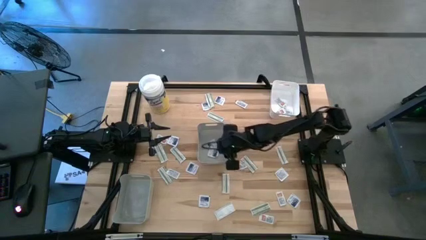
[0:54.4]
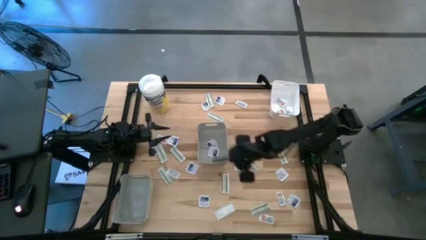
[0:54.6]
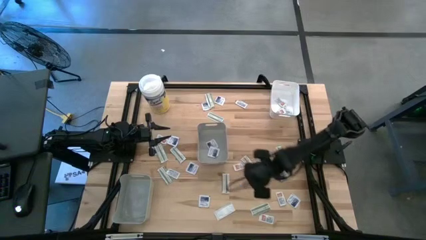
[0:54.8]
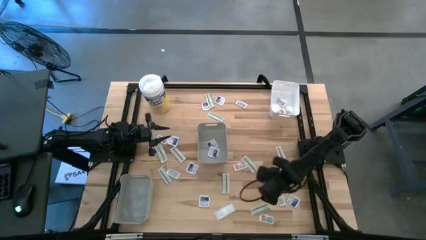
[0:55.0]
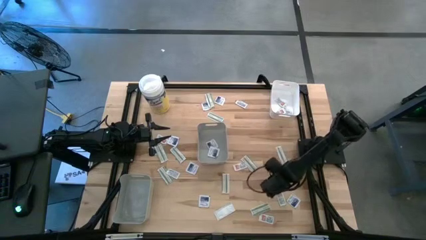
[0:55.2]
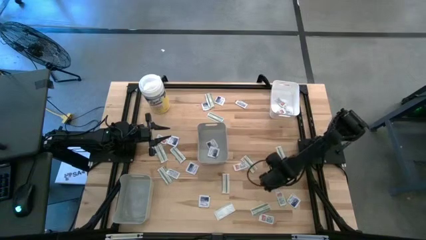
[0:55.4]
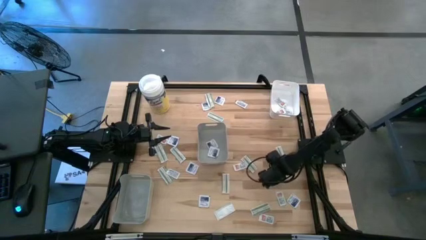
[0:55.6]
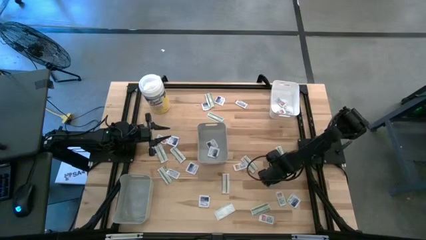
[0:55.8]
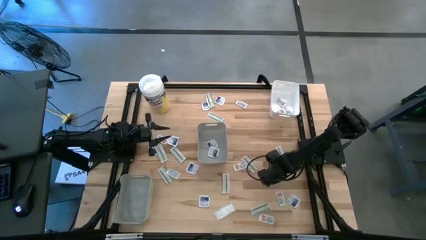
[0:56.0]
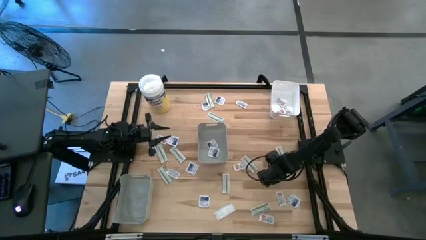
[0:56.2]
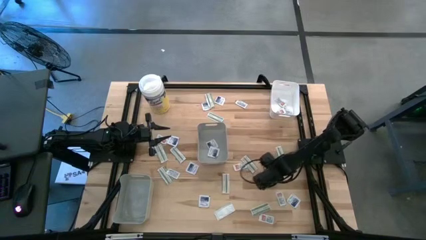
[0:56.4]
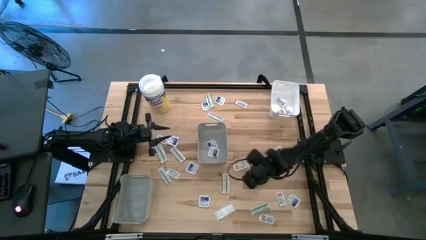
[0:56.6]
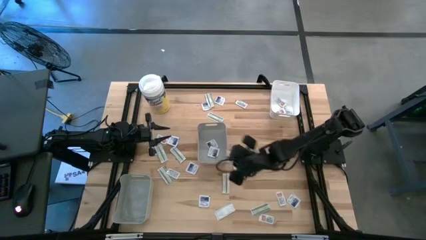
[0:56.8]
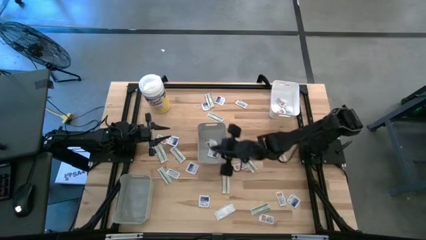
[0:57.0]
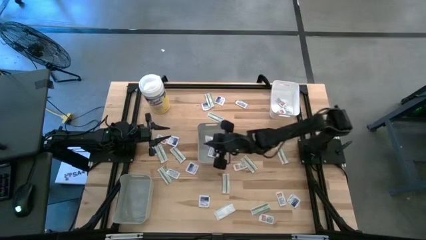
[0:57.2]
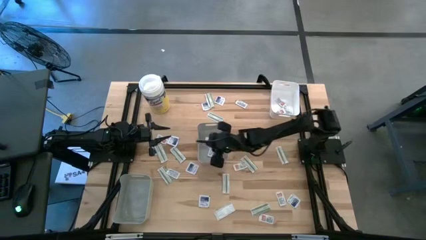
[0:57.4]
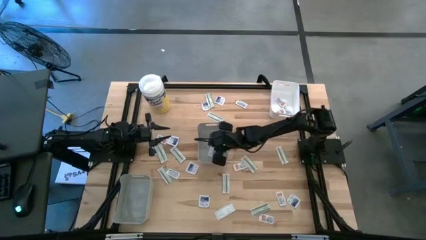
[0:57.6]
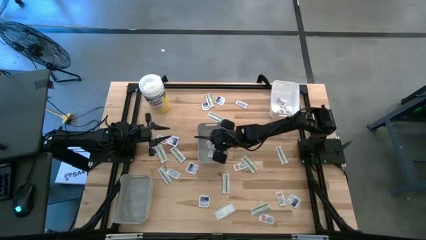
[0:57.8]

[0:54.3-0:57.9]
Task: Pick & Place First Aid Supplies
Put the blue pad into the middle gray bin

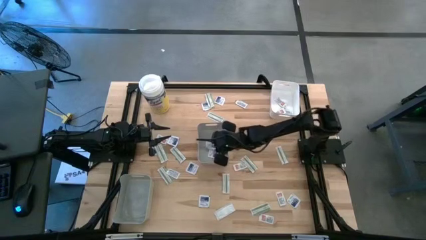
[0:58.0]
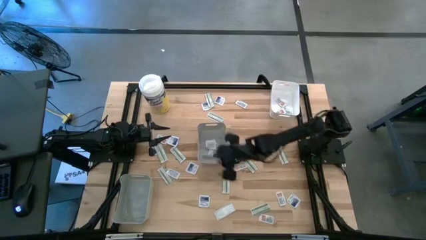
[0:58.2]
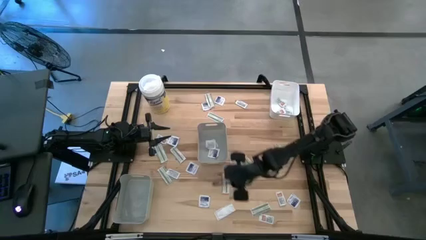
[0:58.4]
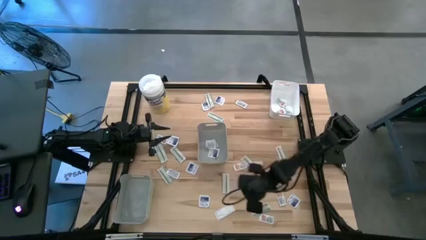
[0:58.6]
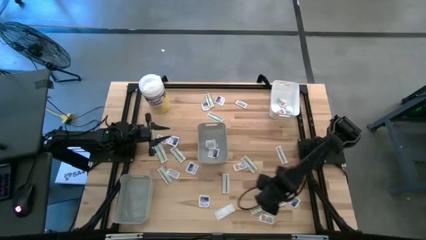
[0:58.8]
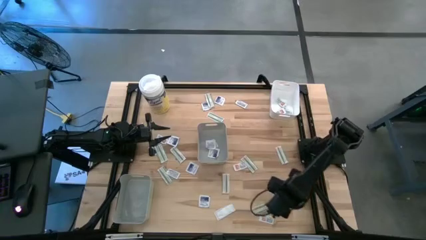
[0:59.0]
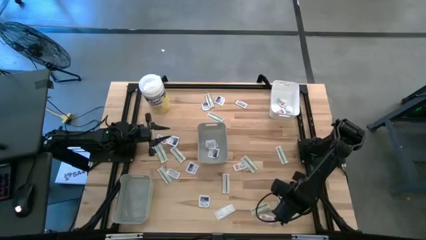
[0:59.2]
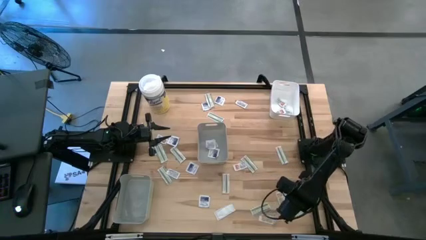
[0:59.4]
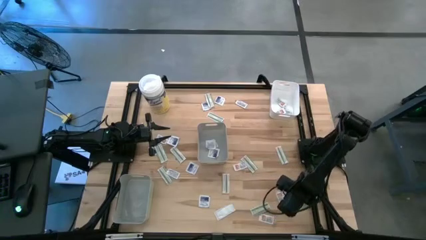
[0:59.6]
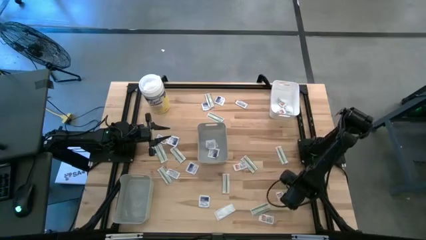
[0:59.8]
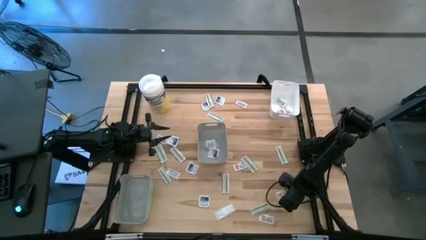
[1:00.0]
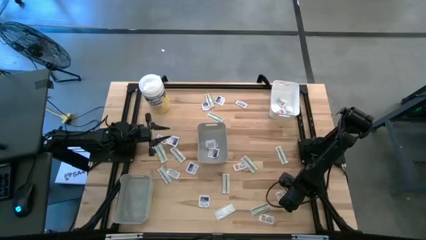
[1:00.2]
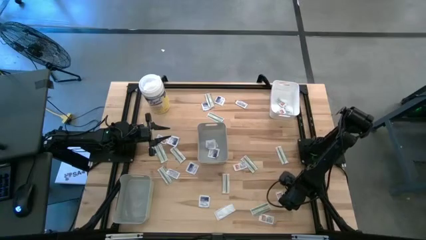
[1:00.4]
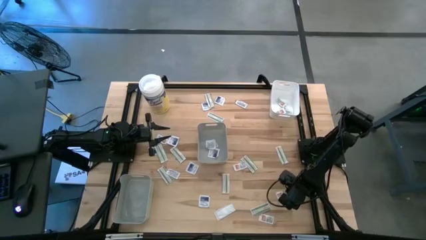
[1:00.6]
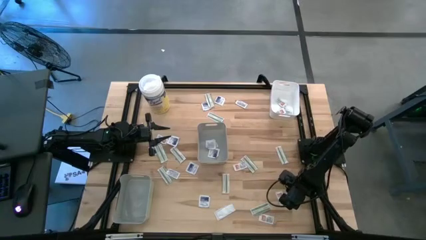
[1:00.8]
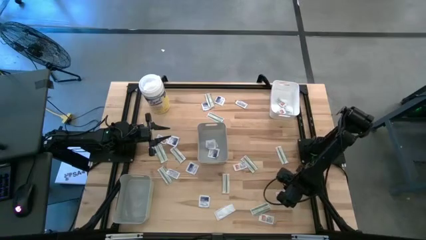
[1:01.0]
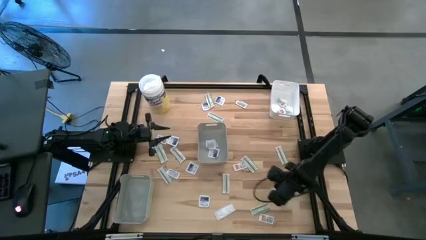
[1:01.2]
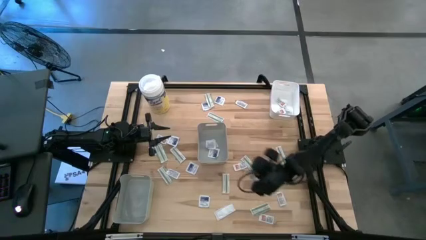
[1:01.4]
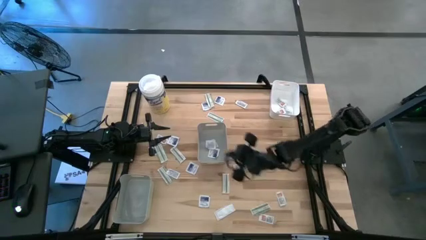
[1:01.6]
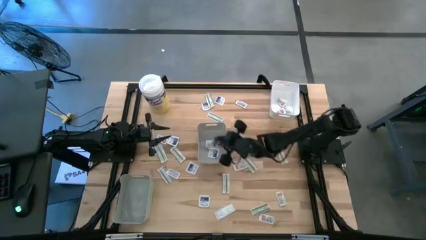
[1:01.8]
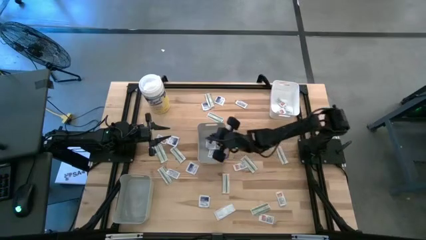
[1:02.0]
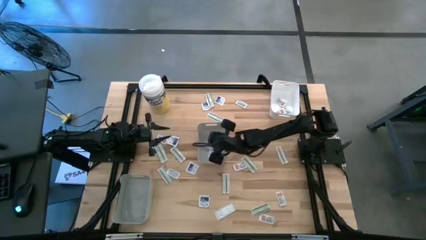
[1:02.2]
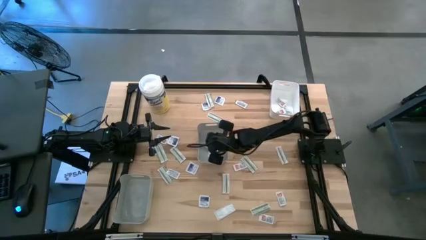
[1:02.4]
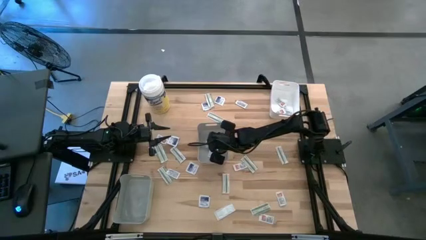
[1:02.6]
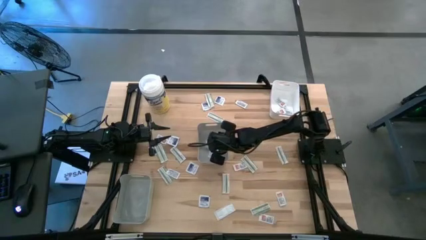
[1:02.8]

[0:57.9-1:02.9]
Put the blue pad into the middle gray bin

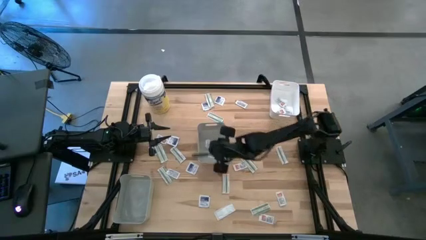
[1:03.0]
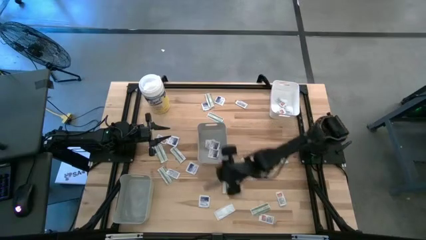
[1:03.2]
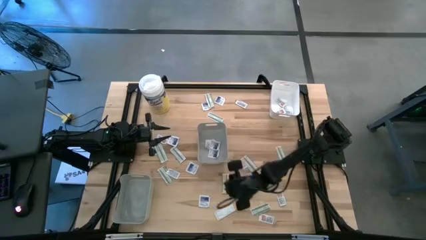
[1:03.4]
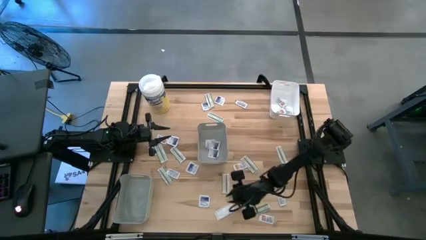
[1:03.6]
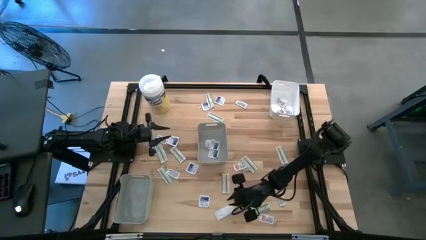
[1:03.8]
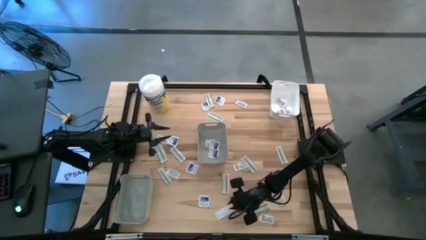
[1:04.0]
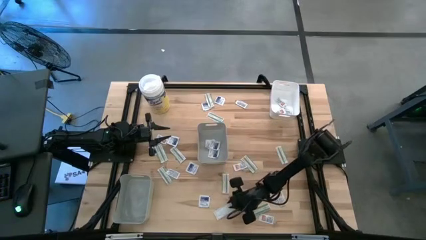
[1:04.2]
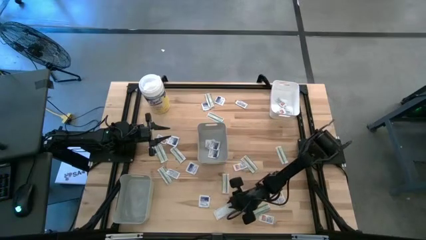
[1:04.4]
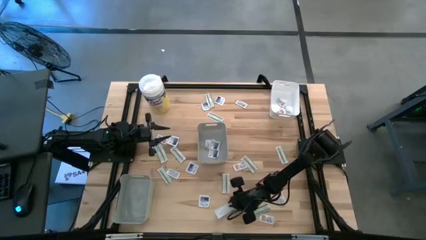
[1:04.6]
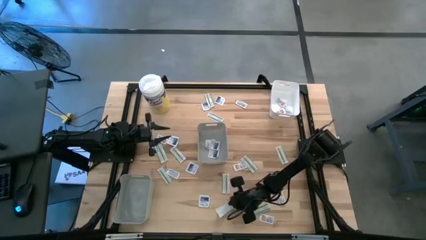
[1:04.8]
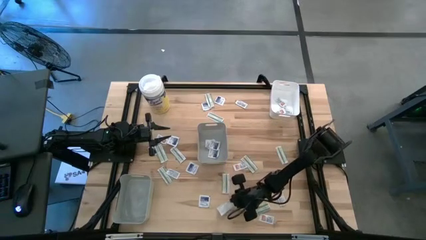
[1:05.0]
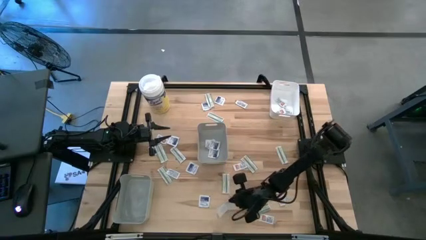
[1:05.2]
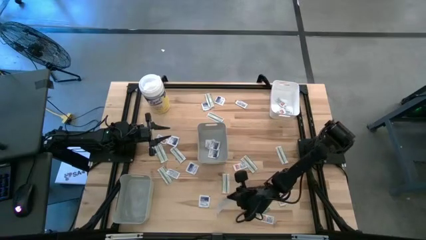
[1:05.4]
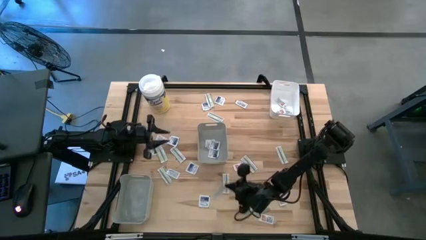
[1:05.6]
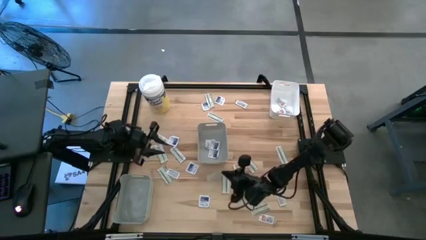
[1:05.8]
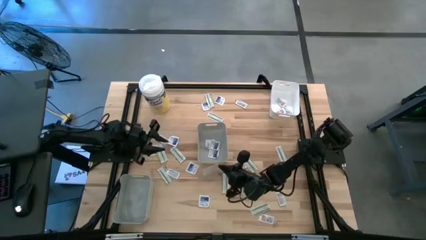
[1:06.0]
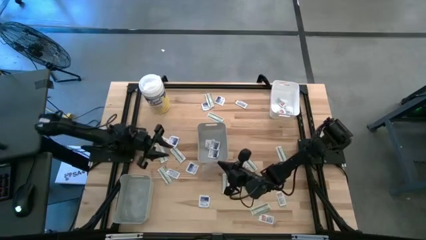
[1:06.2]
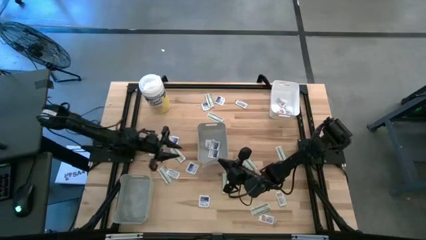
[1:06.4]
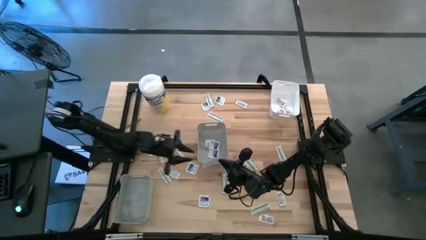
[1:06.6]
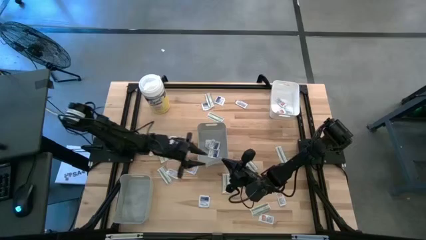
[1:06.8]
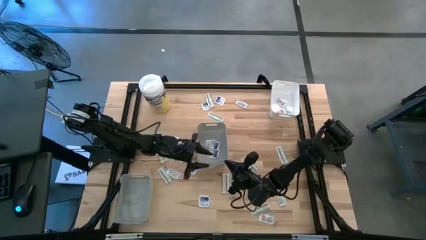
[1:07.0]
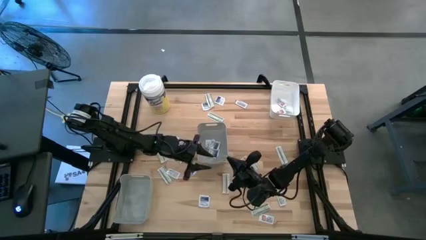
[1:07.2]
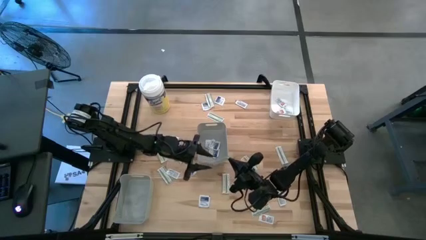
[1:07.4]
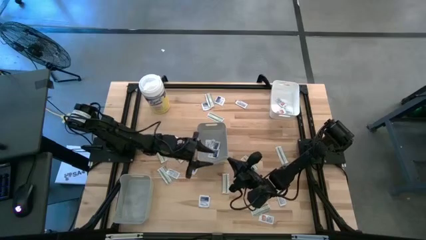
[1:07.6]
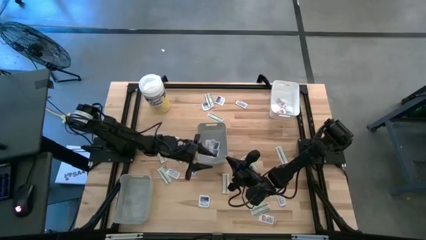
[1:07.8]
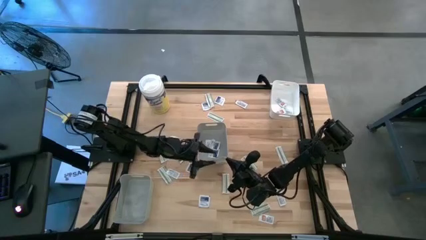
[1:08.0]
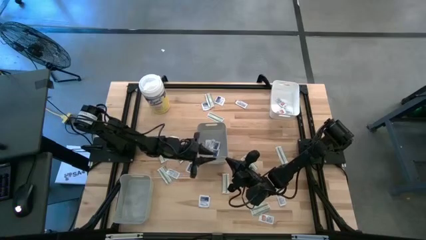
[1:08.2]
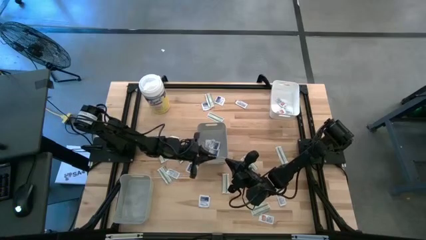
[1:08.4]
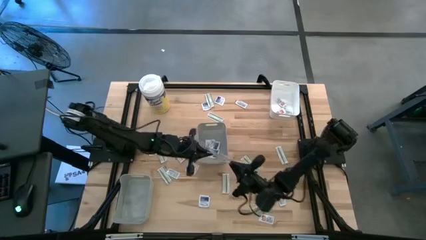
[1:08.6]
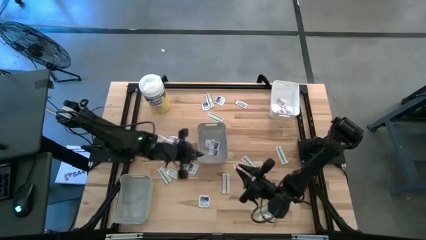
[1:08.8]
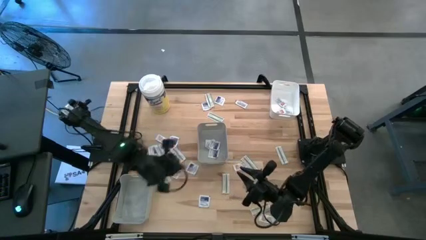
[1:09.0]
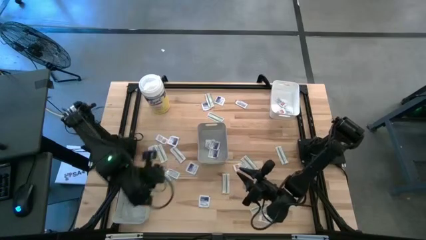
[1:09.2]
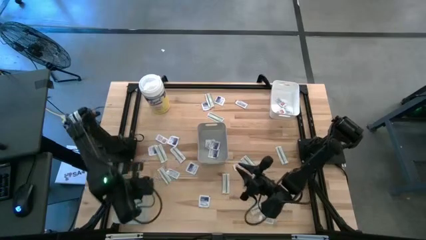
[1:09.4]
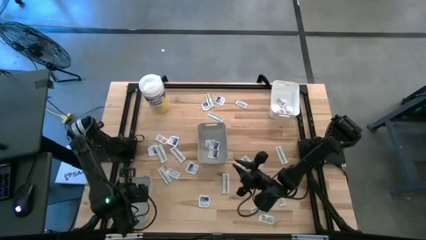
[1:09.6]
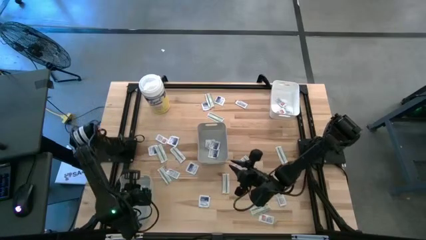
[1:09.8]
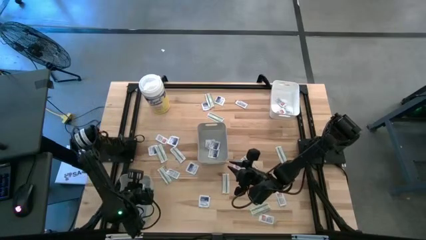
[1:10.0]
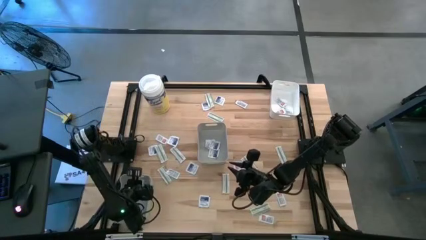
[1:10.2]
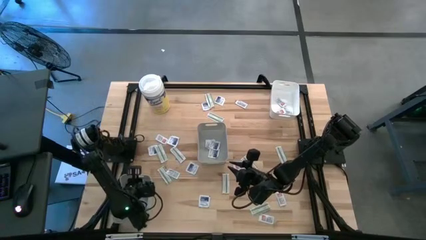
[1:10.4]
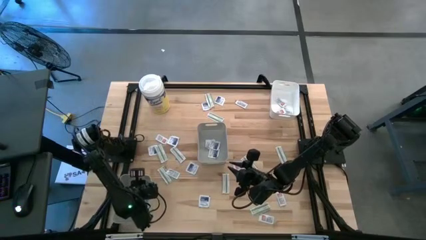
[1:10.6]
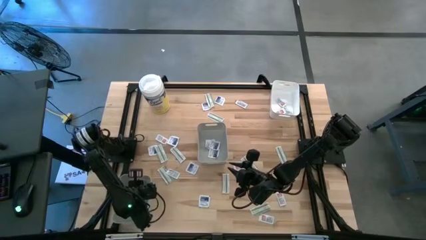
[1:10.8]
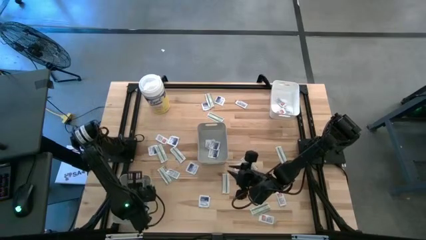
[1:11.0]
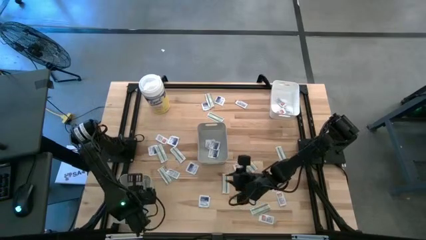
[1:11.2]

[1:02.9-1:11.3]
Put the green pad into the bottom gray bin
